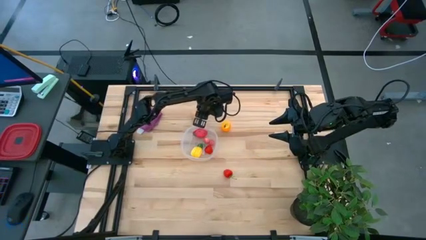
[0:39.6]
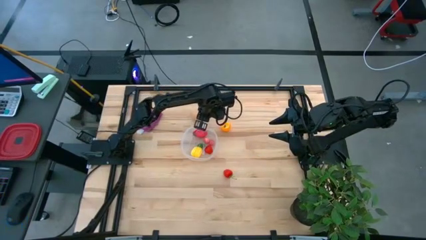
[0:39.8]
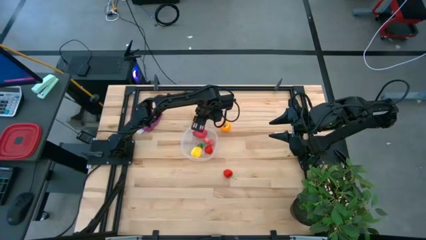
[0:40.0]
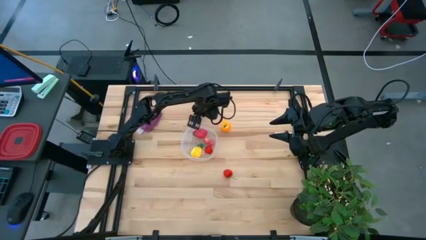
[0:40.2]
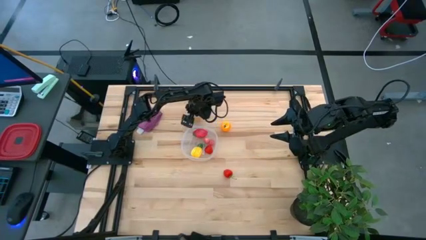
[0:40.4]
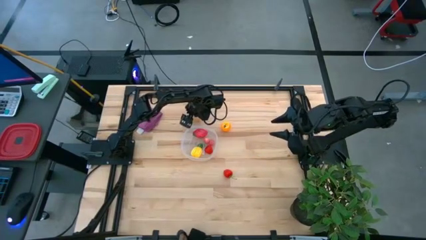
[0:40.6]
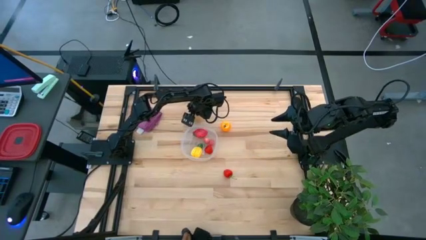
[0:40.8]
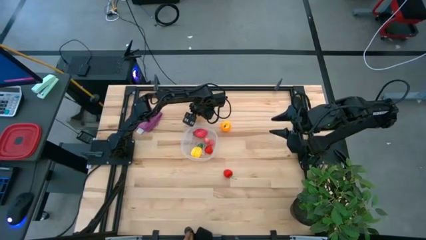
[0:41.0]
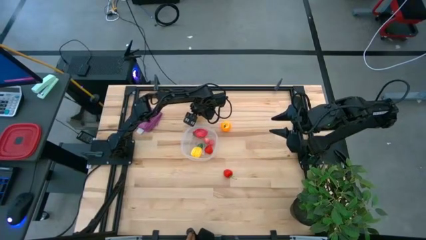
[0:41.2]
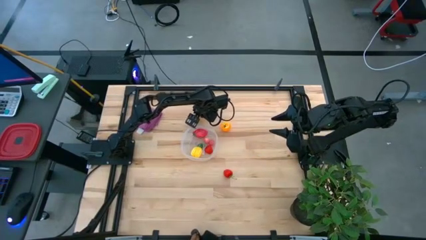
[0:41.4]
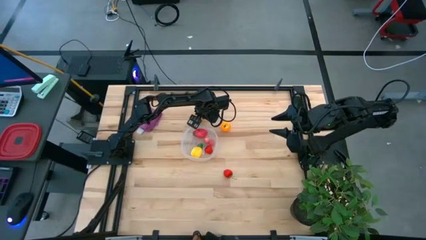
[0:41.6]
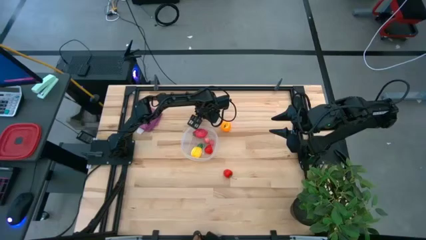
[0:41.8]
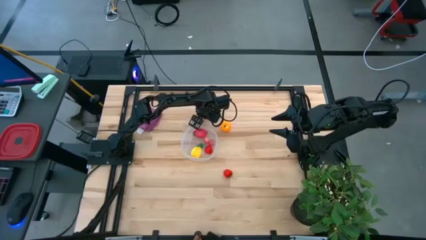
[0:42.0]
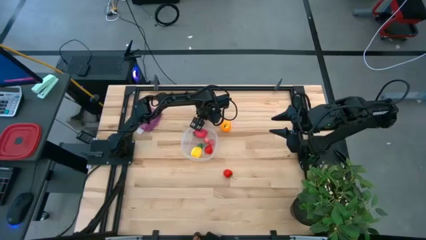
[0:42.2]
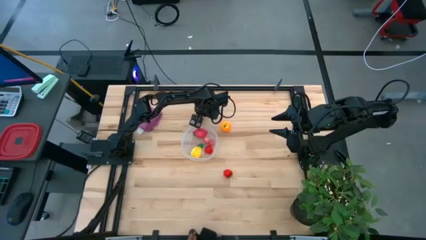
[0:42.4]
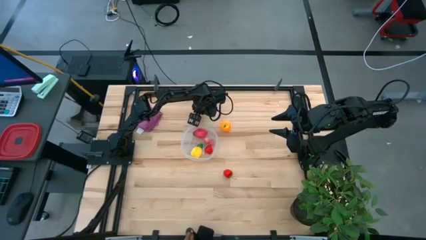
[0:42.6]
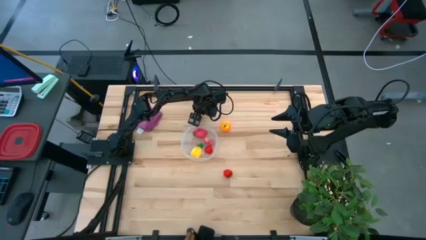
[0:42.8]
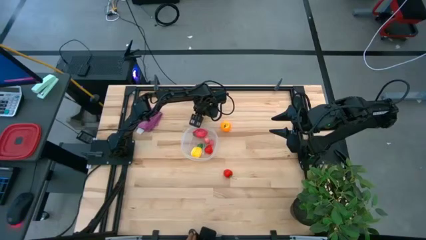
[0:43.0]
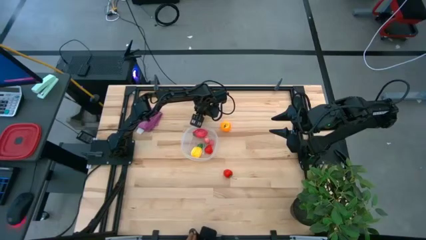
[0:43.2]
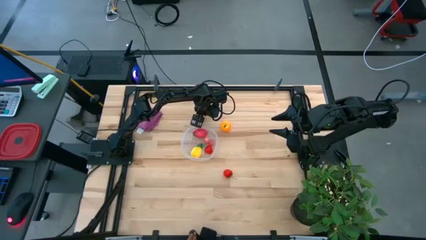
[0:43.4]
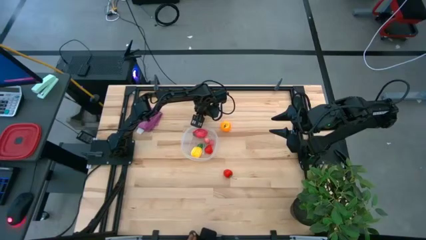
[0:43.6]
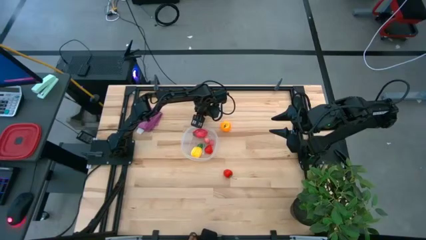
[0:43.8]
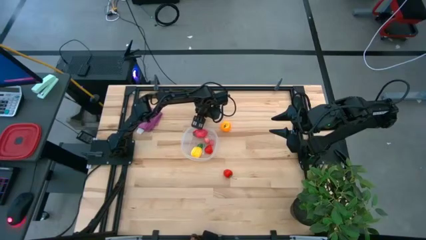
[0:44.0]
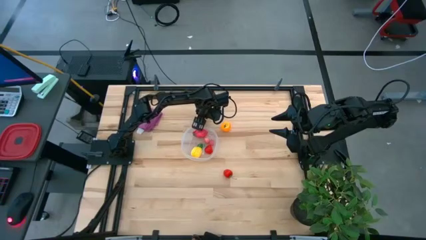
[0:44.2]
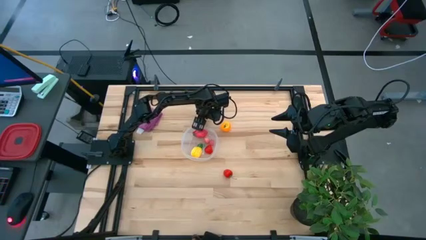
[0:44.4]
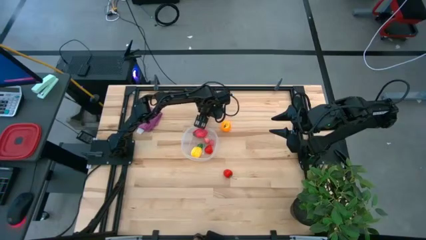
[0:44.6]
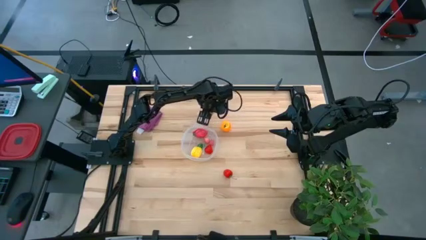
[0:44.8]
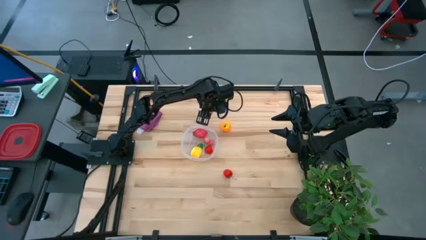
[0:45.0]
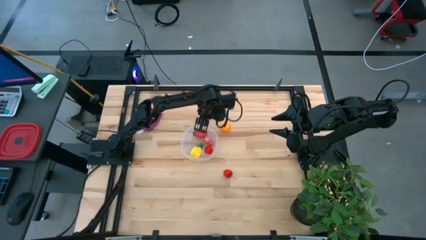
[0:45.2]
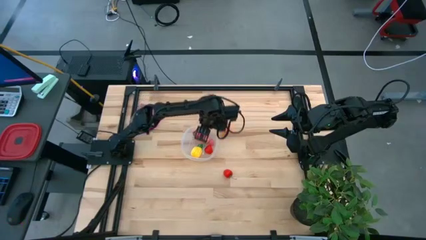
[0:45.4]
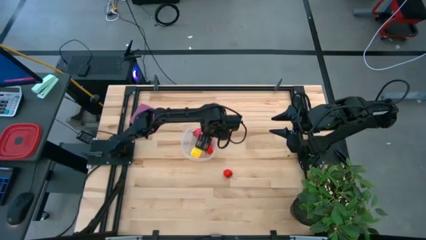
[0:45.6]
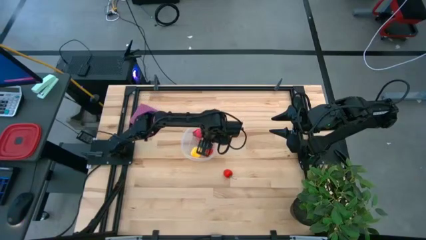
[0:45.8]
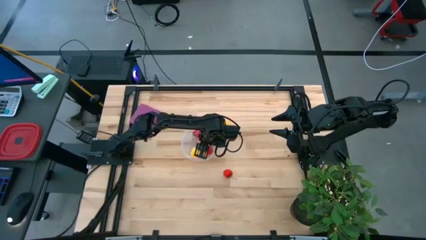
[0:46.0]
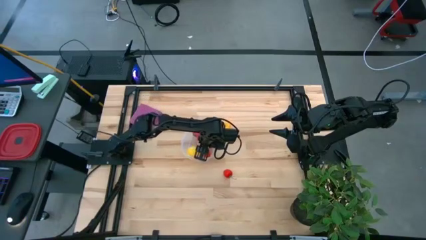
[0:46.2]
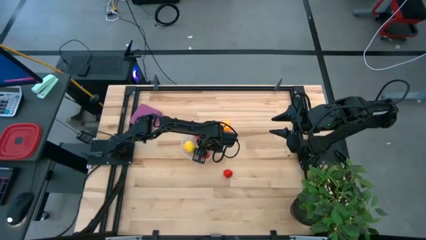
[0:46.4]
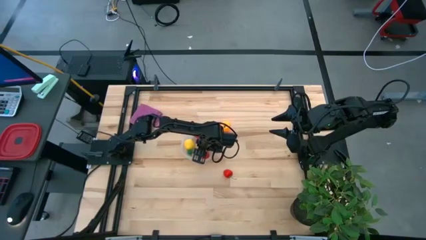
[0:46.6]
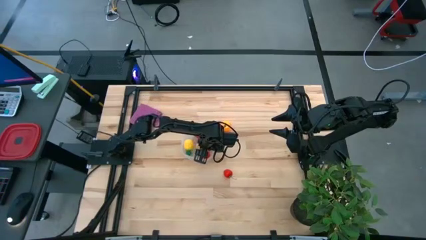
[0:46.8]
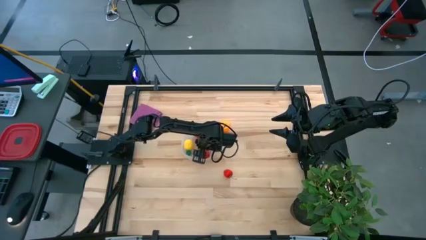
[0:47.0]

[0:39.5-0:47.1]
Task: Pick and placing Produce into tupperware
Put the brown potato into the transparent bin

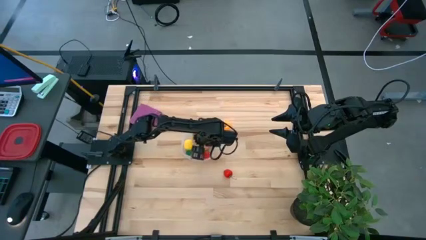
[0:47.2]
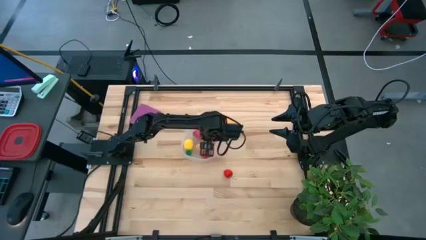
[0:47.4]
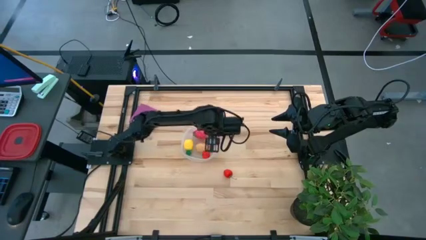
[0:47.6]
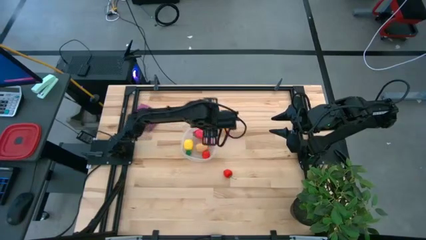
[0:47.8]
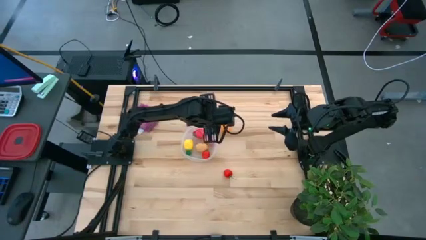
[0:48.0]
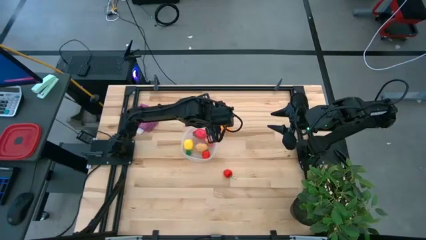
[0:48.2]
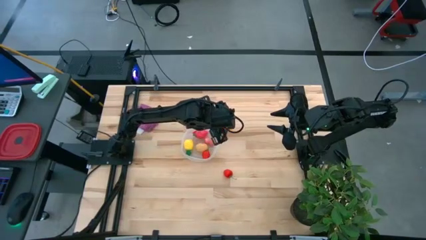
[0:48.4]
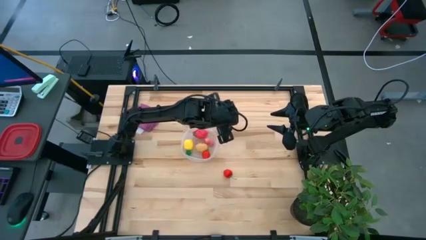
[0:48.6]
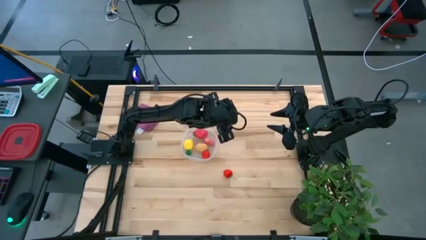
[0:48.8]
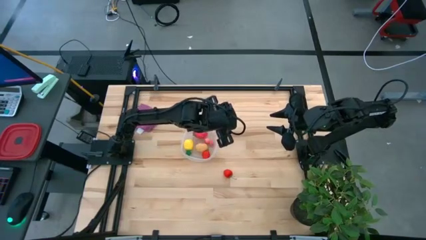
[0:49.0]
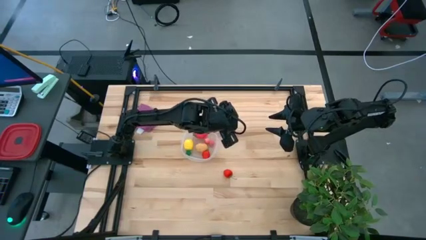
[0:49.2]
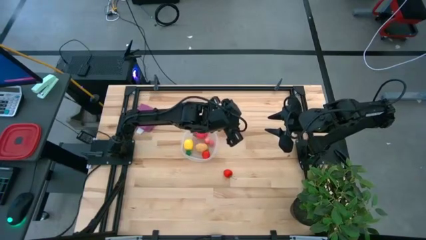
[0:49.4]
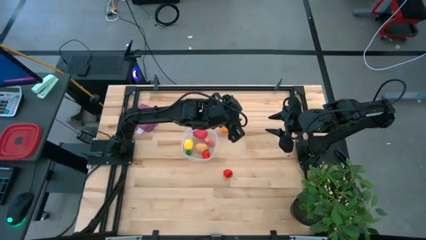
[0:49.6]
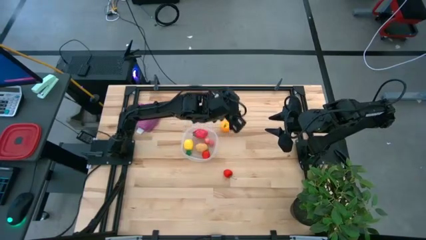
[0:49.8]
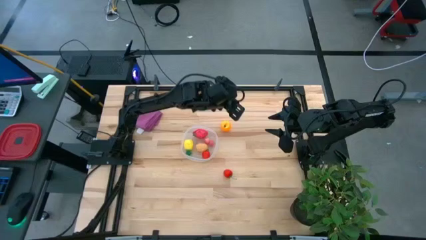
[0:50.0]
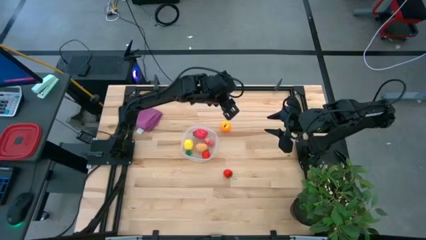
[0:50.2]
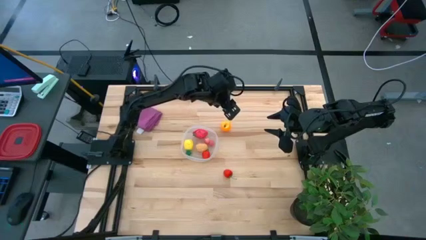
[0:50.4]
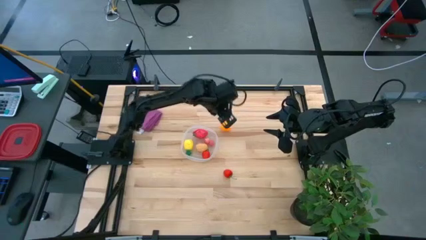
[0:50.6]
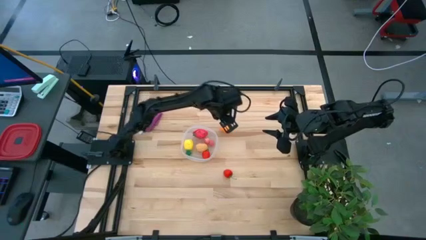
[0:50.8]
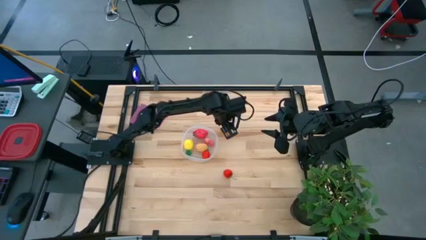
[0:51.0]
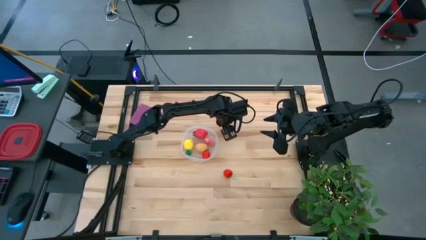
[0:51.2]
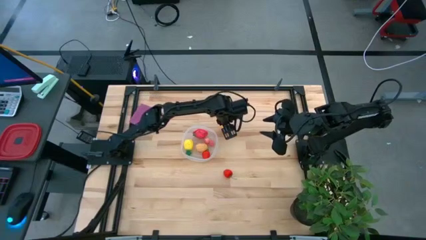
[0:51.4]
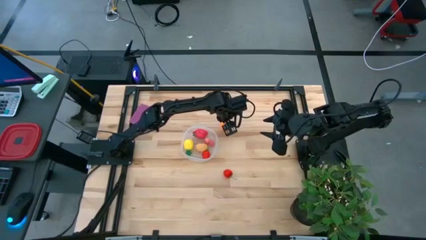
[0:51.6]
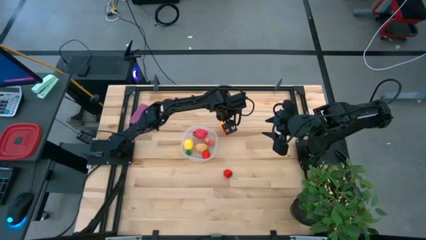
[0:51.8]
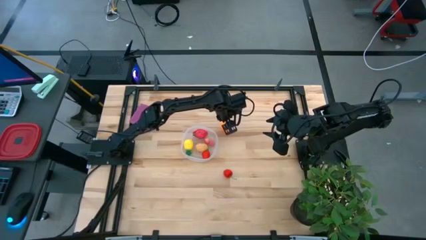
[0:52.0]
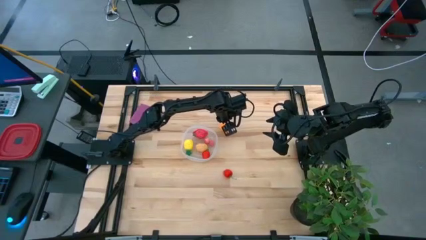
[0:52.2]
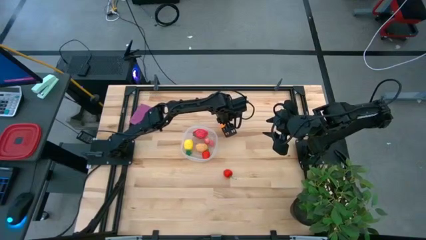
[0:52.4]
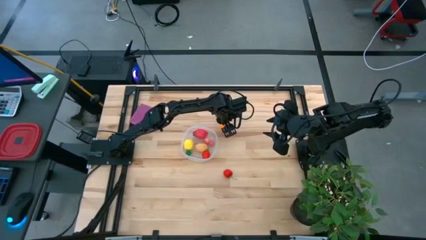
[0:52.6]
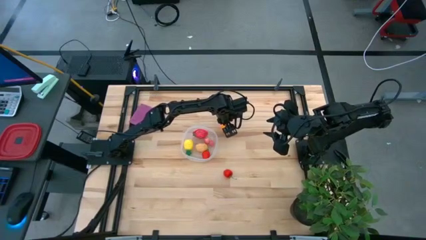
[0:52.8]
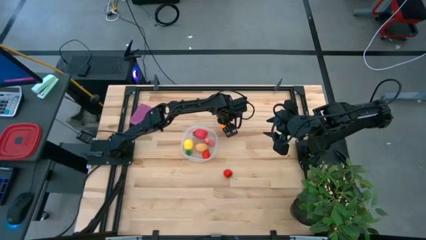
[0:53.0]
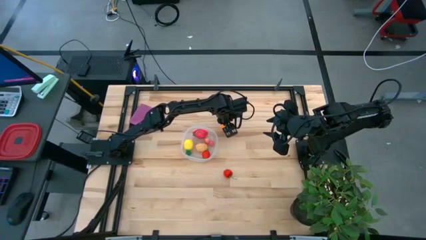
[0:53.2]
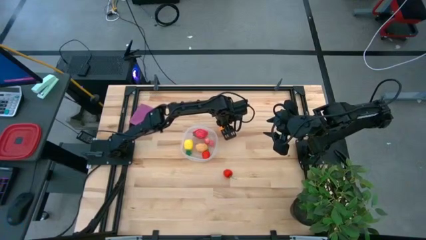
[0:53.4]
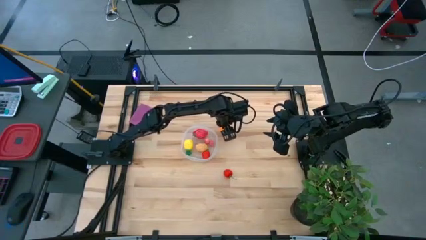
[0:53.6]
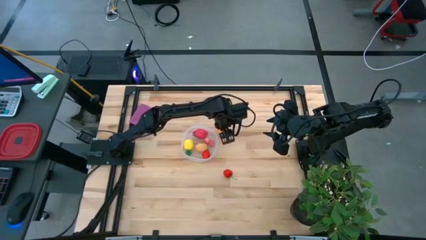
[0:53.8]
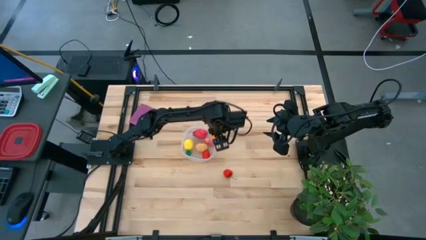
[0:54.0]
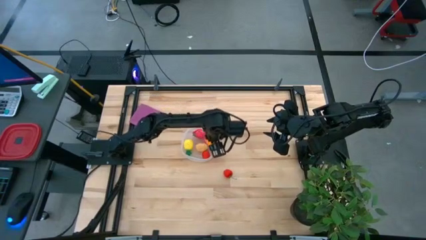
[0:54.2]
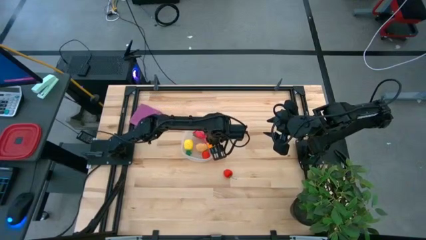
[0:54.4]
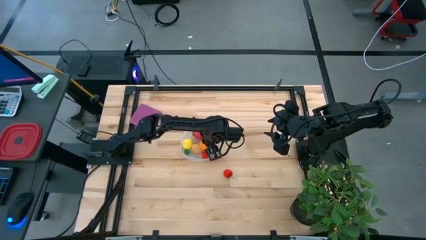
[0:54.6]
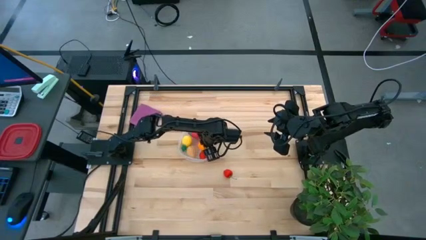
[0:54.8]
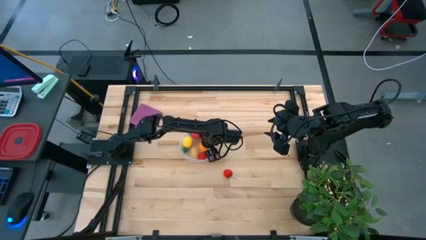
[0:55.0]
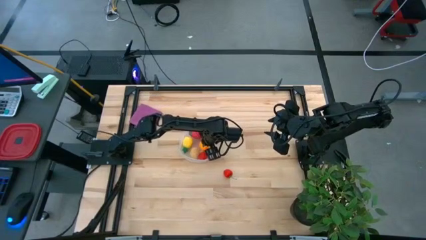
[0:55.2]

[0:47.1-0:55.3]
Put the orange into the transparent bin

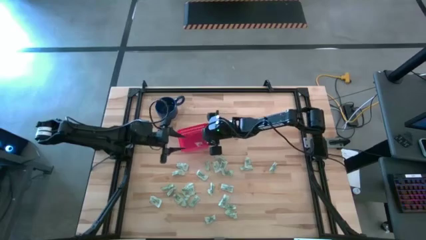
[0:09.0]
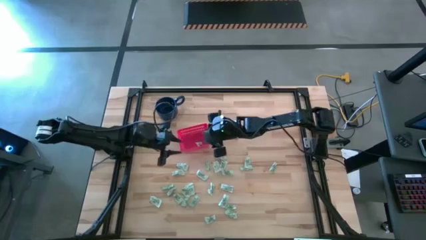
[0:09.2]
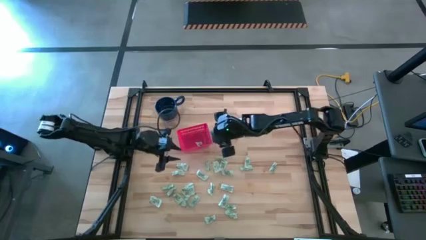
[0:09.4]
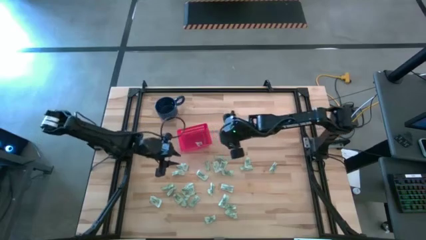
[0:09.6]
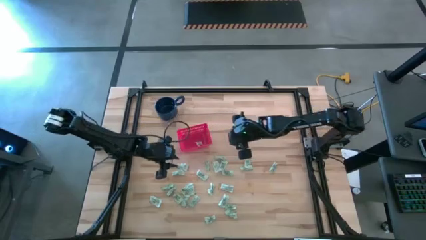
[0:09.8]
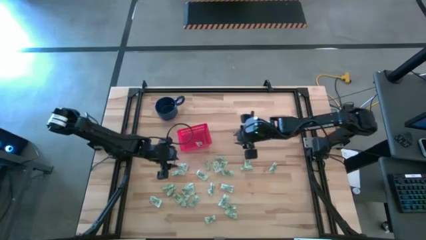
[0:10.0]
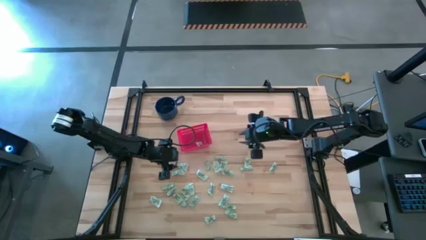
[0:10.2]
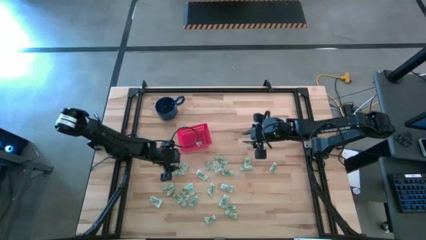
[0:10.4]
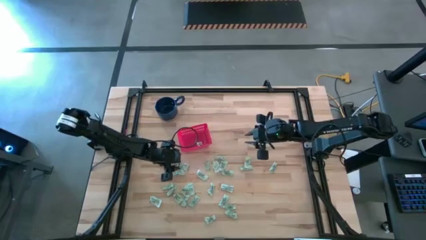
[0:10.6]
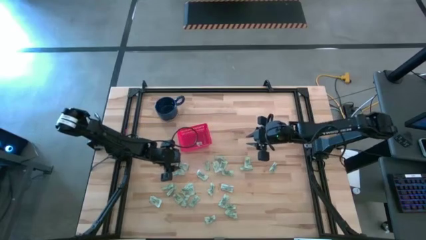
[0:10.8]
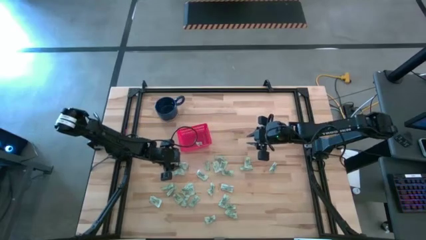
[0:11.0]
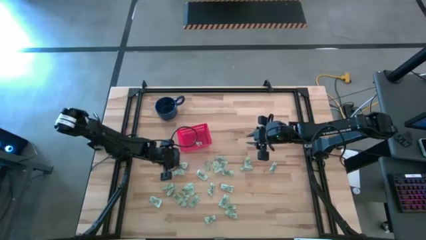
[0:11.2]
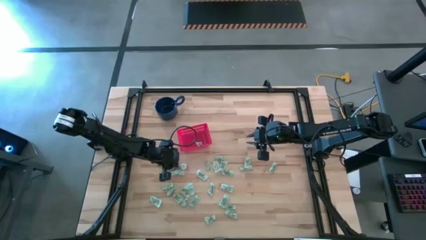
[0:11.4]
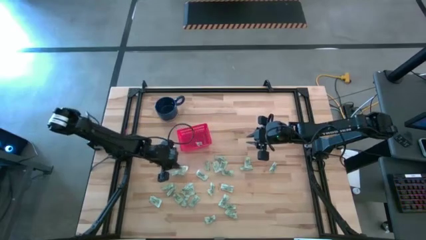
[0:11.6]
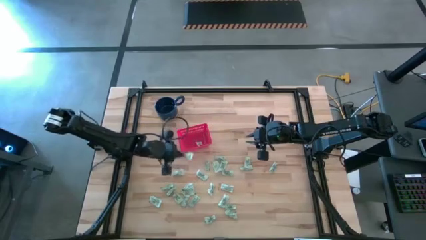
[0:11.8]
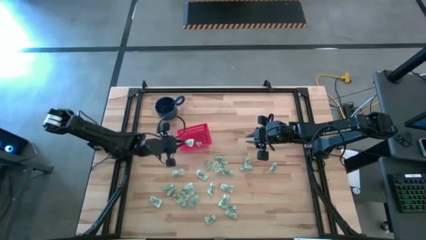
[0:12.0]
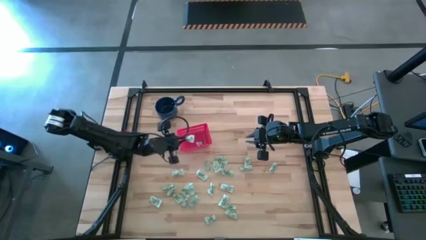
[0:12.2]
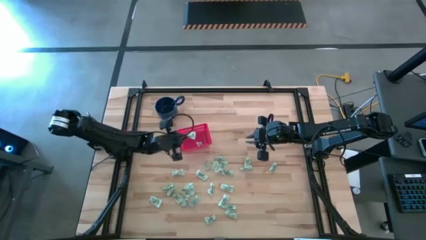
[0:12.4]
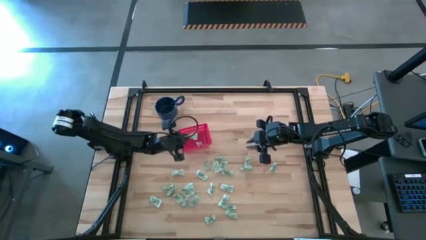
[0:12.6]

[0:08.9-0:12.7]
Task: Pick and place items into bin
Put the green stevia packet into the red bin
